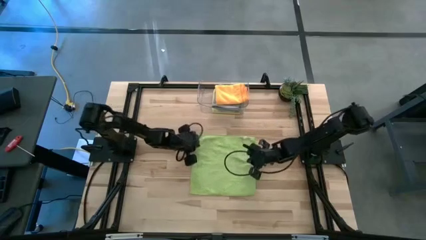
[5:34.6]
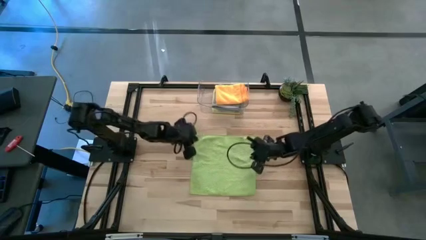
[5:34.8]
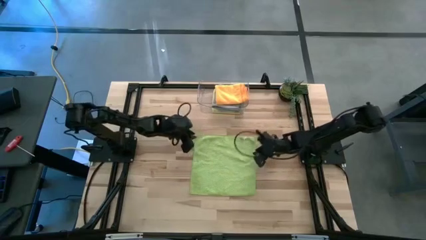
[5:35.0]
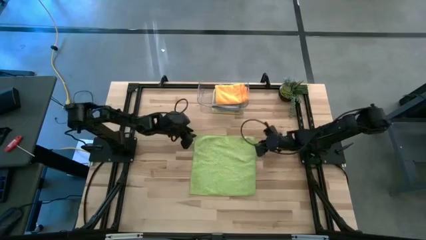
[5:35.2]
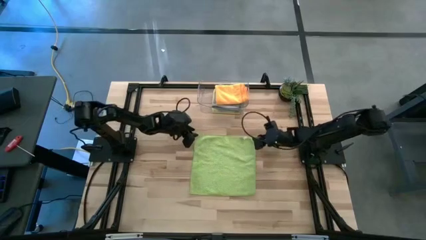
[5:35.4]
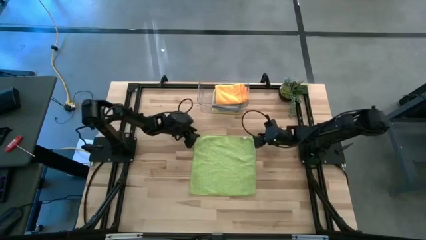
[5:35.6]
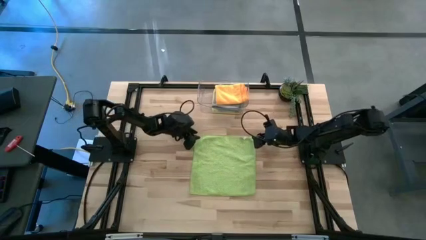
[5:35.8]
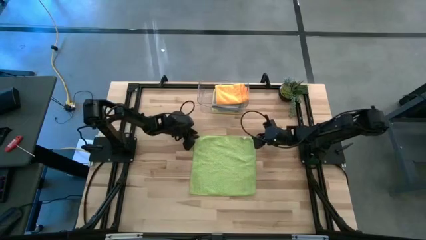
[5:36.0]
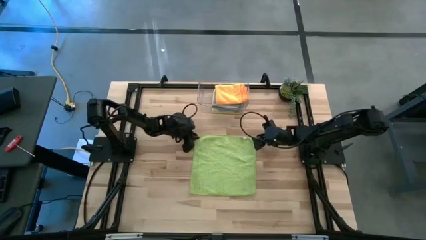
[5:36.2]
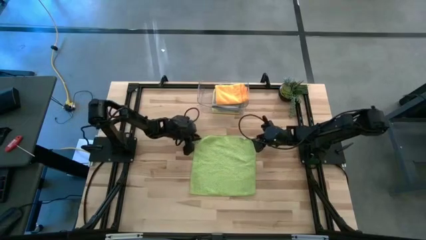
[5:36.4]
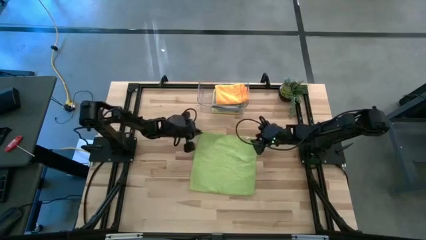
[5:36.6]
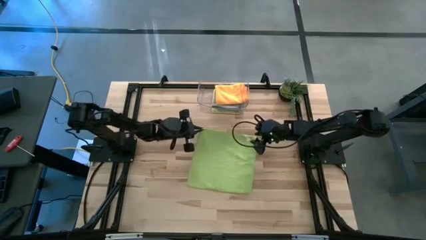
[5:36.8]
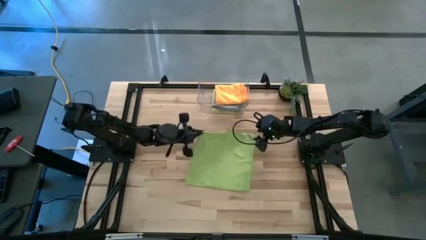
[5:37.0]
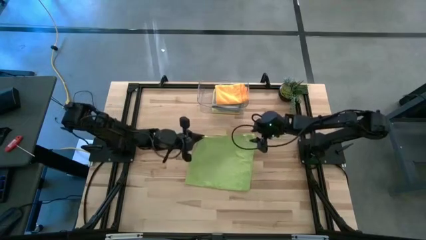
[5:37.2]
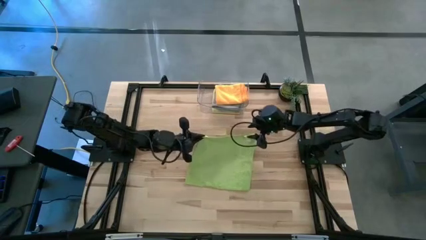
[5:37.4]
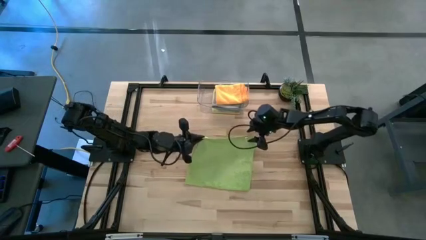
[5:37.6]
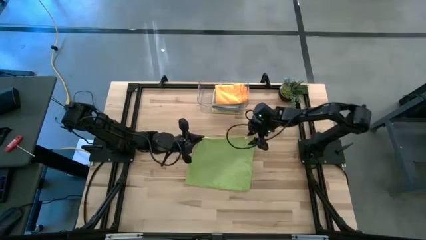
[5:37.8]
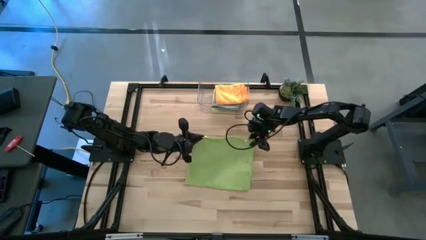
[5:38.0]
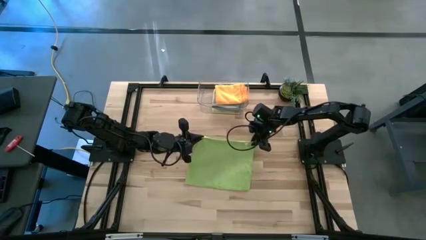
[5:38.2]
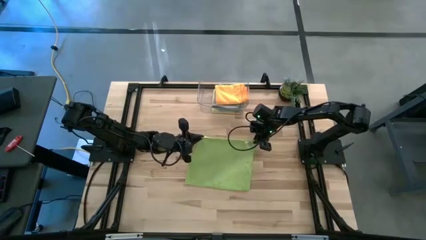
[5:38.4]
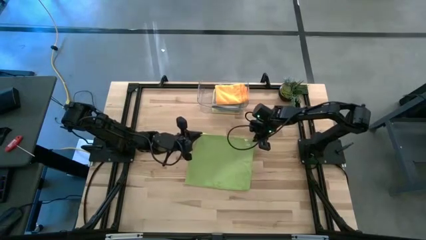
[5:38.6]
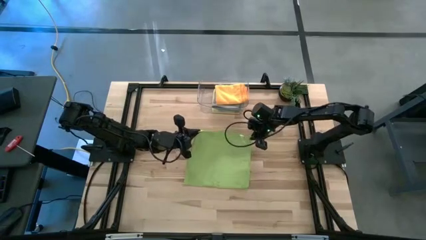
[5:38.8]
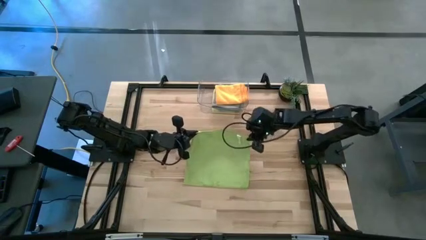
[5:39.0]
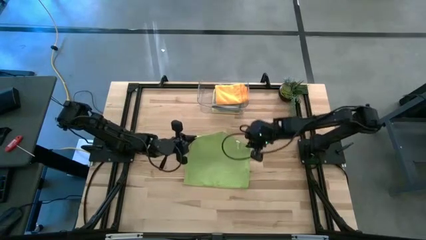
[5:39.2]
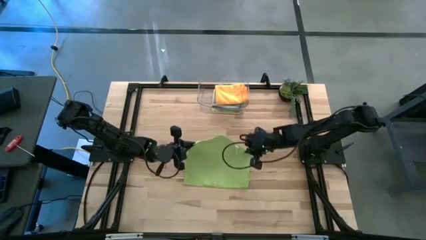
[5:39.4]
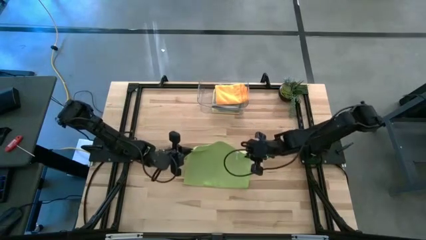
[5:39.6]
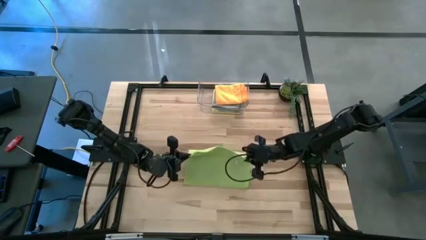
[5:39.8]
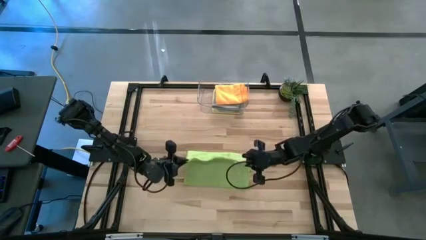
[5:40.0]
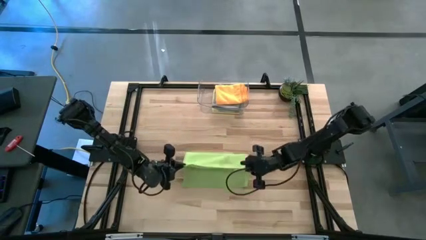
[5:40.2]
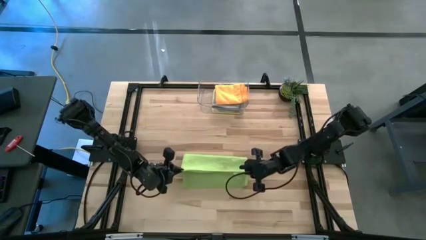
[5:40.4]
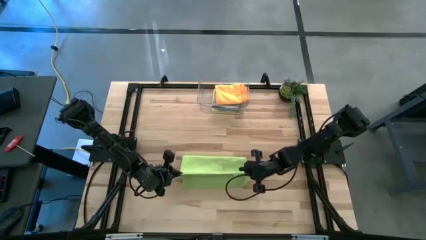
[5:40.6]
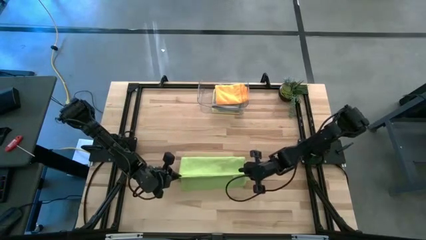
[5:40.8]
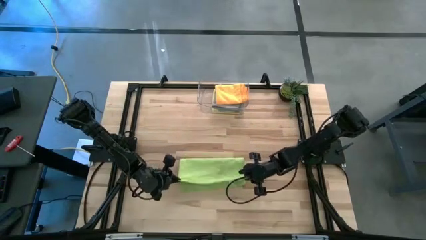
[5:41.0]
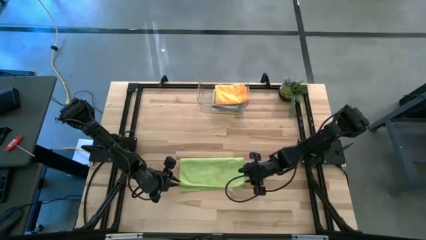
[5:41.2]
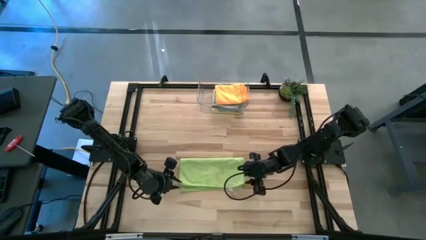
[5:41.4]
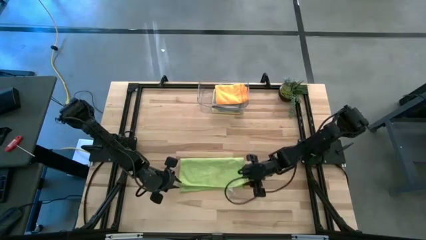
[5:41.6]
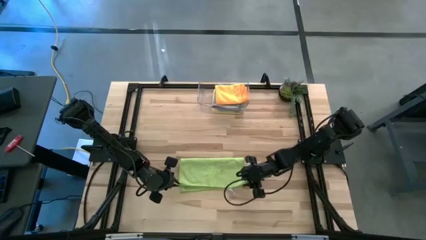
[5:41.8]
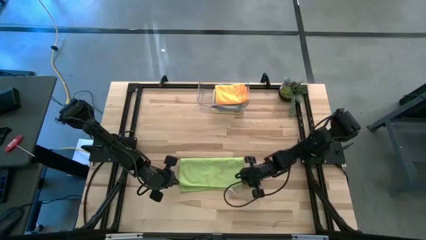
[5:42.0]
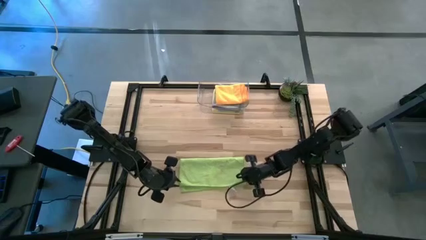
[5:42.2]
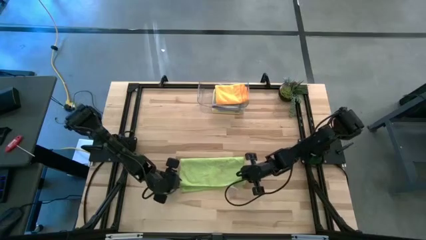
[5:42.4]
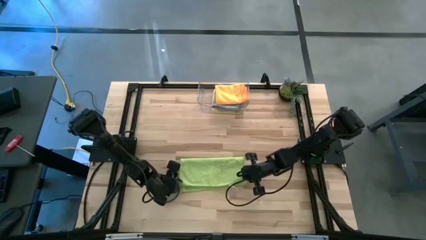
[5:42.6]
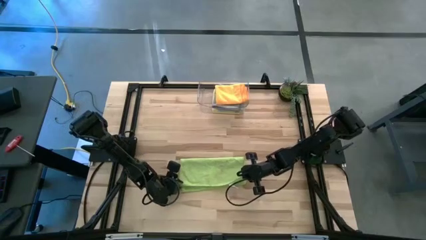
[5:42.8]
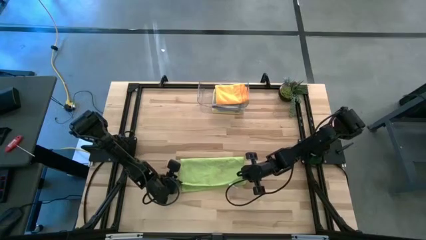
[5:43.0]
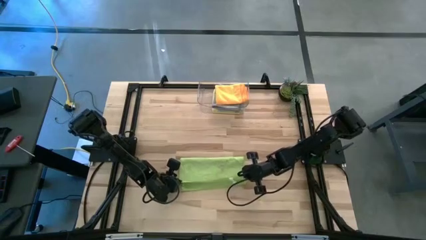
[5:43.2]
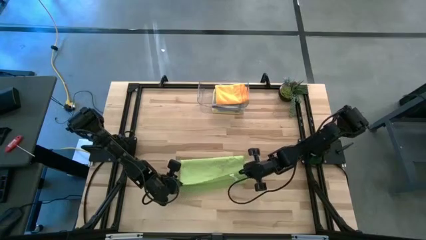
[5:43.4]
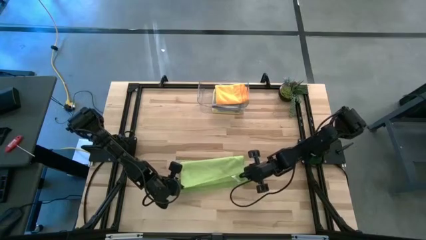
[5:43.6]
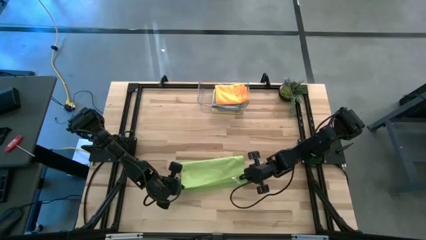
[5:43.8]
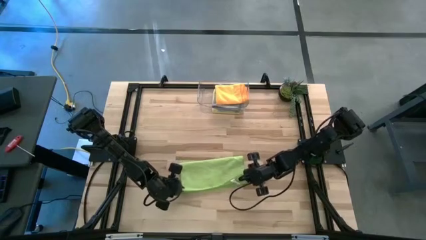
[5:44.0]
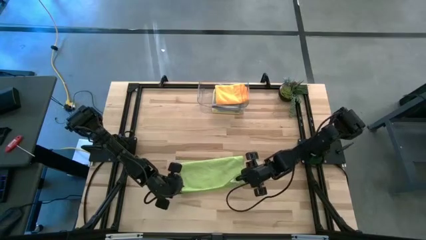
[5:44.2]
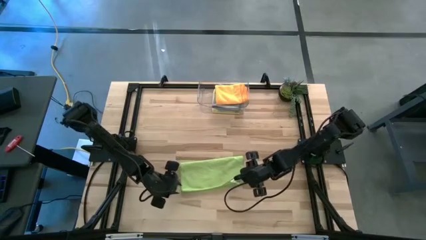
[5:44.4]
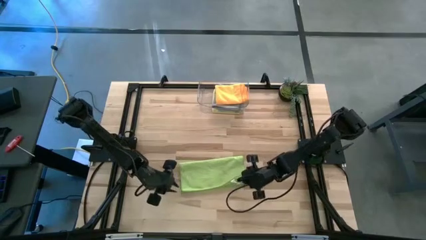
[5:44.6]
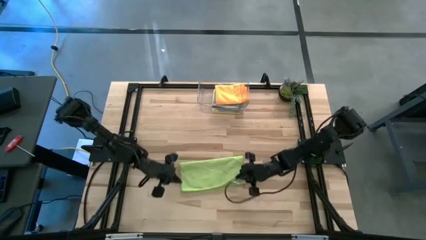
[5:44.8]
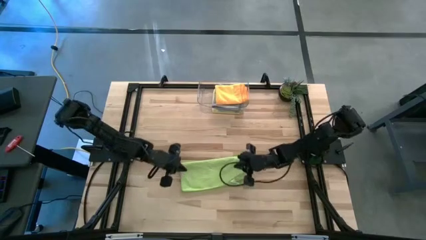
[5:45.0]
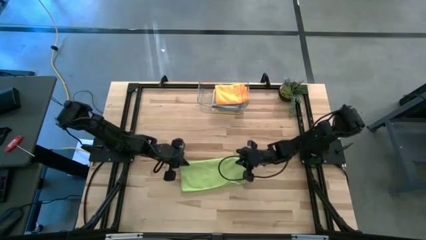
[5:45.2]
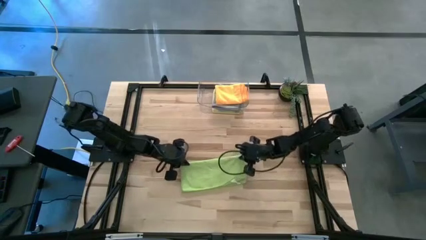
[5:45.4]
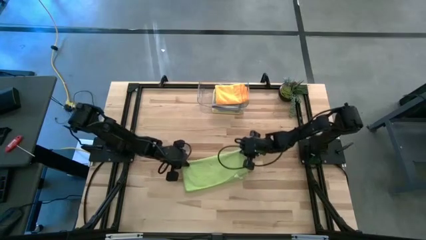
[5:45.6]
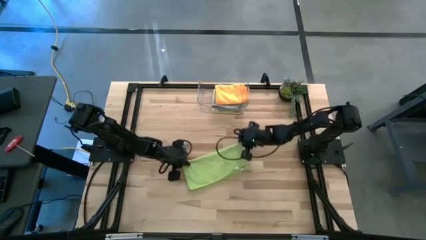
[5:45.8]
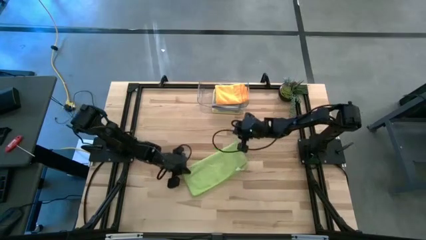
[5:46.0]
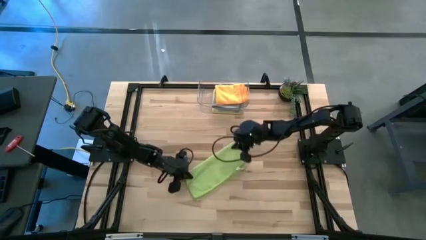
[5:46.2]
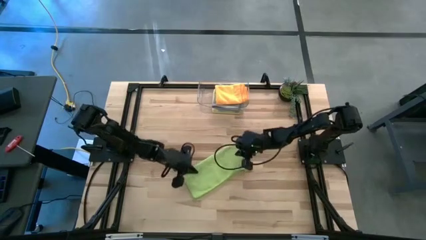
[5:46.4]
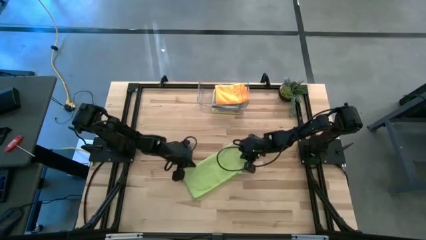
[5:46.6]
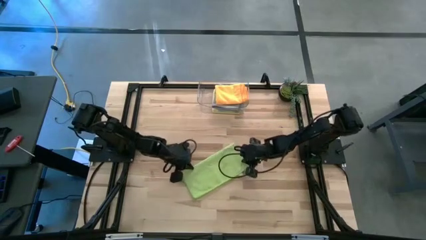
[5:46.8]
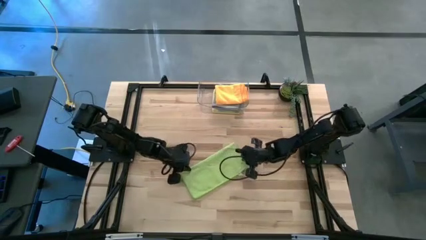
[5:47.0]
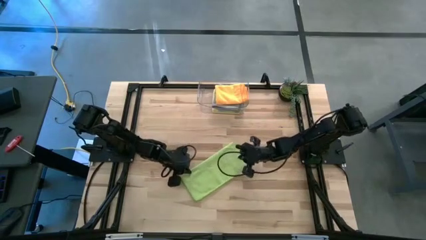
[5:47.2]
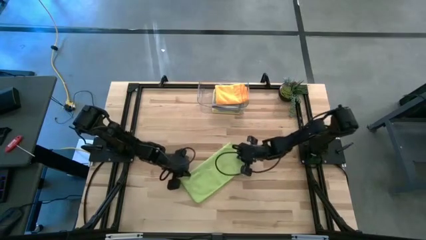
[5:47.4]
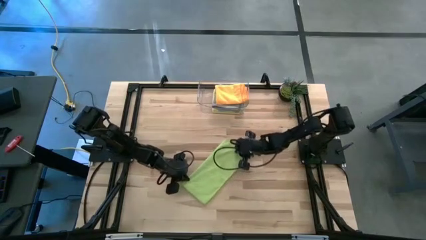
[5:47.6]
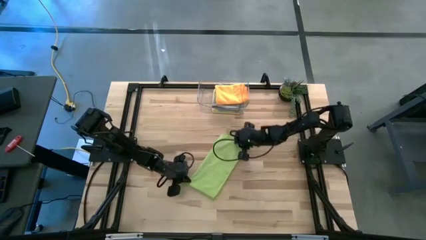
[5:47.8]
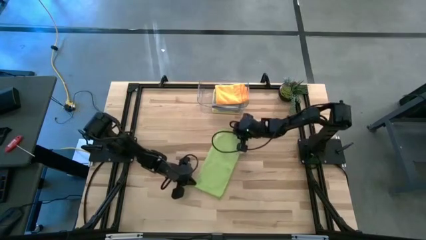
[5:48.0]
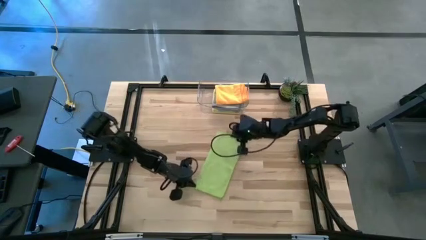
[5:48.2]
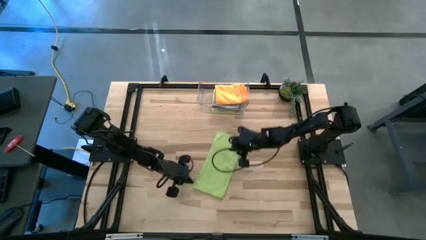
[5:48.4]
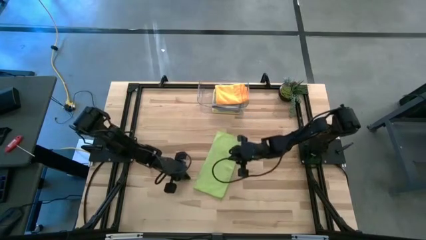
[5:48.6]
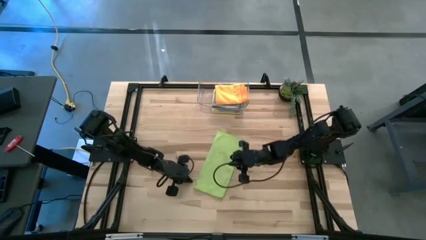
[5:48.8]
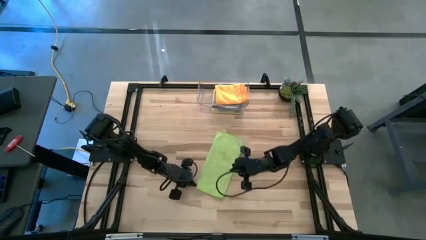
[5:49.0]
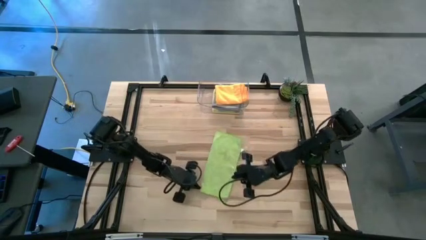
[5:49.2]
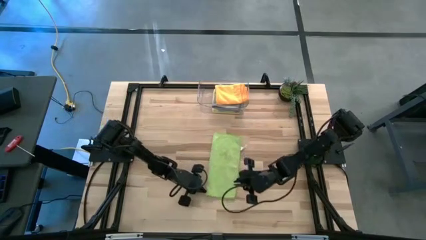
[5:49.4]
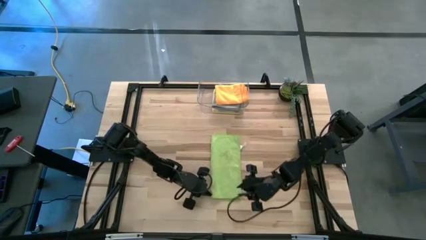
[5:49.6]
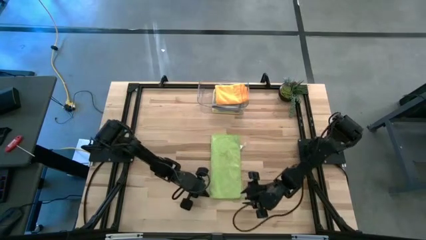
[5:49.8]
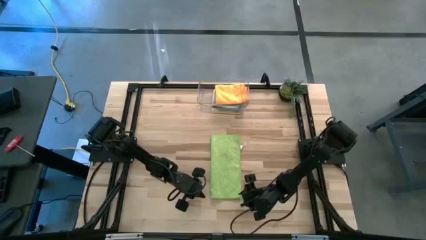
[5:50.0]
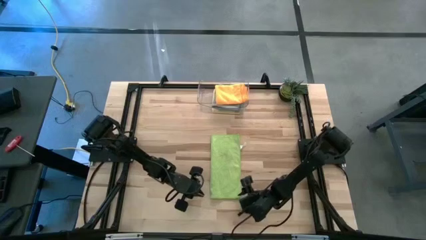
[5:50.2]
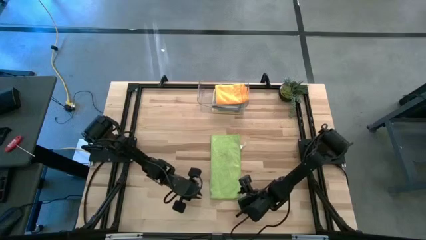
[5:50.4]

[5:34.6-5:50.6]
Task: Fold microfiber towels
Fold the green towel on the table
